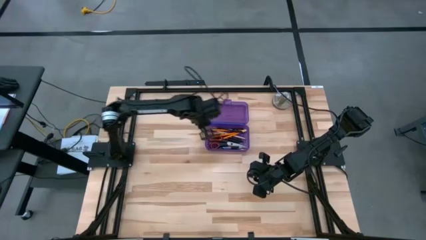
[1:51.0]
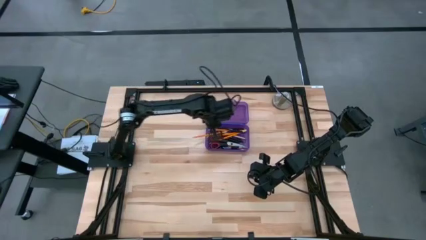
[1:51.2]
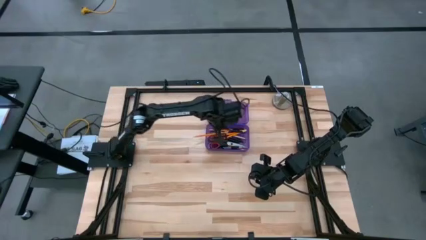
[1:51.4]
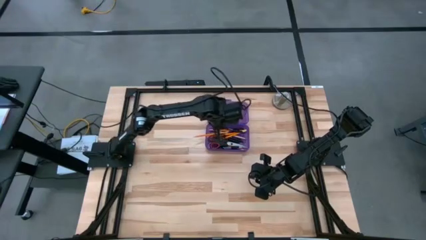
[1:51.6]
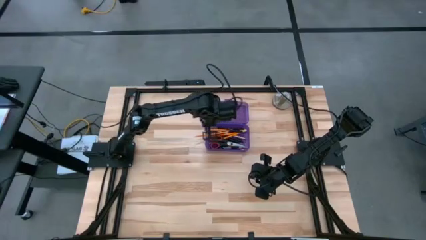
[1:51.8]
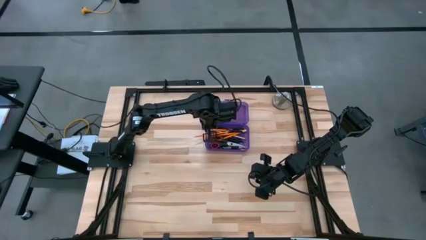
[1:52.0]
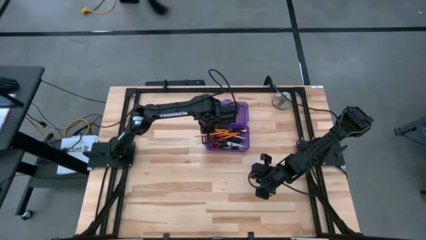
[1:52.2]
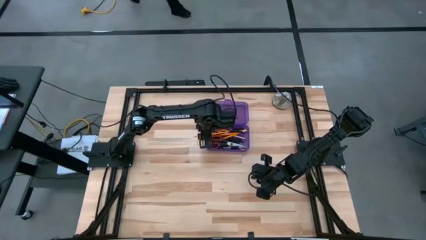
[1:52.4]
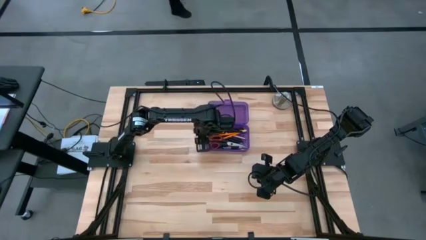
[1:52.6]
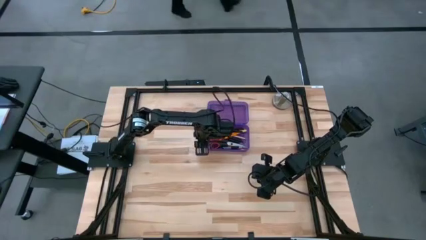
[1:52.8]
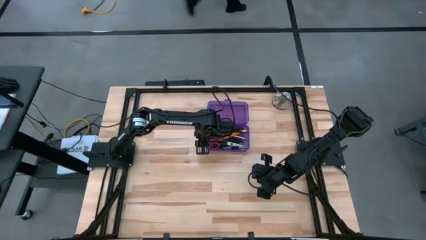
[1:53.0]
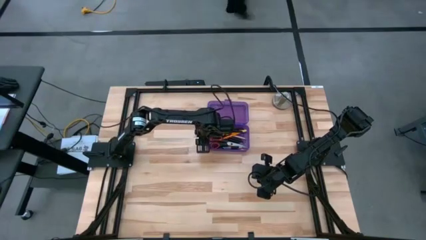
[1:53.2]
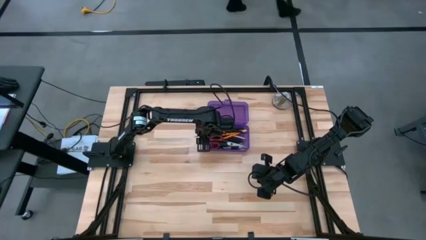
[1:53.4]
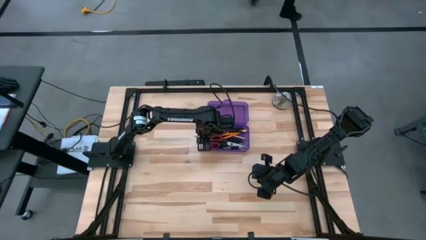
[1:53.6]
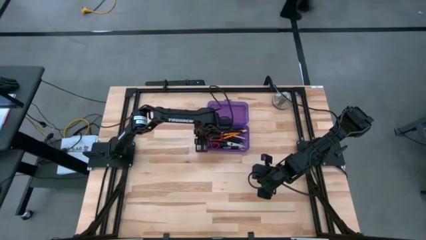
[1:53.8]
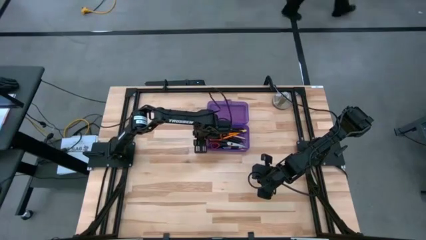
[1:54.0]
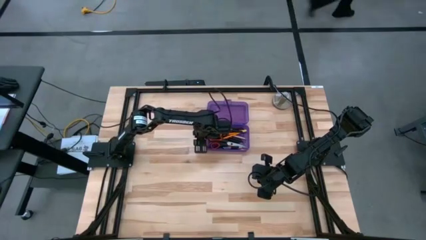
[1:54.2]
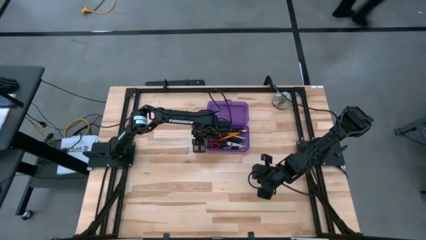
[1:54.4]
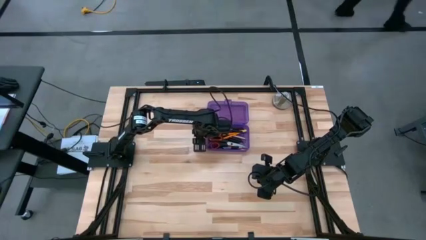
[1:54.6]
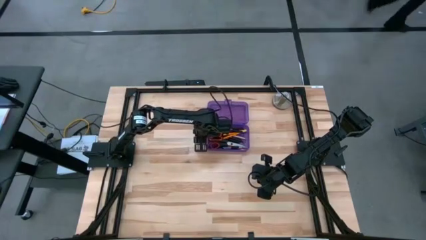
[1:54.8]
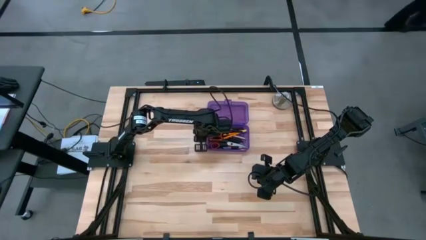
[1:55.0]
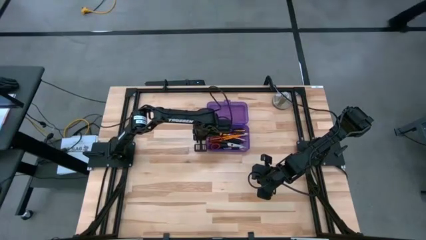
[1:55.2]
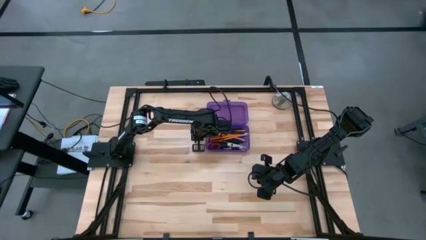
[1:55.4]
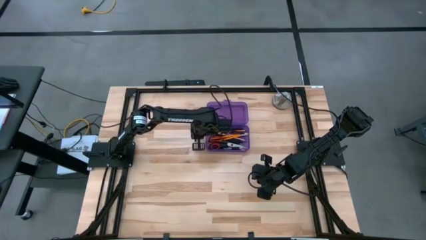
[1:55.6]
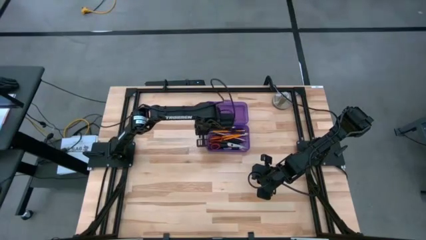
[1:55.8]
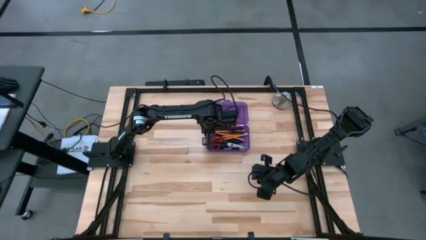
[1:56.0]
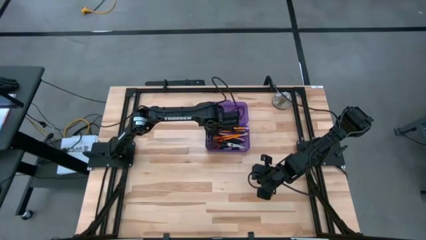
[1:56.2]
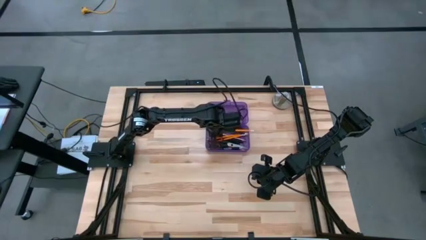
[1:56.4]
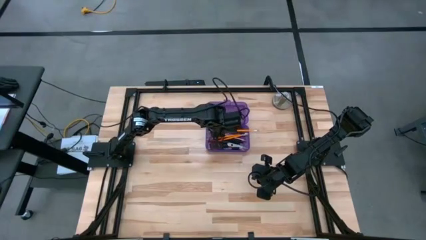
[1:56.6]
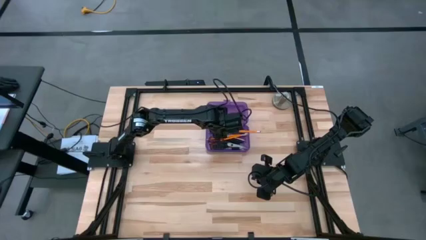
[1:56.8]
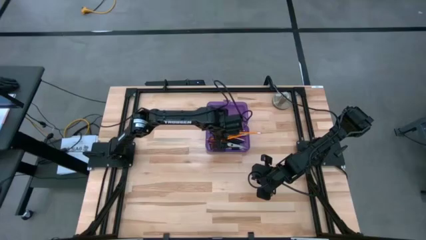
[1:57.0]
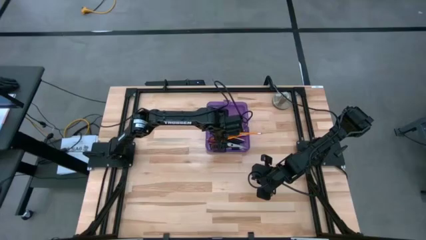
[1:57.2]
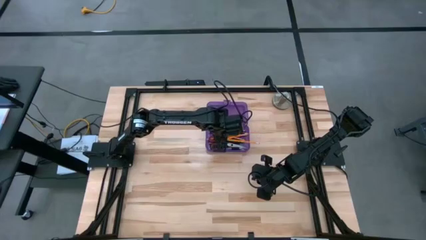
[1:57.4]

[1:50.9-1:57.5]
Task: Pick & place school supplies into a supply box
Put the orange pencil into the pencil box

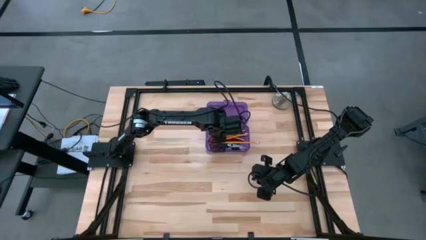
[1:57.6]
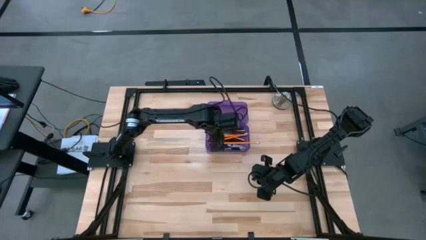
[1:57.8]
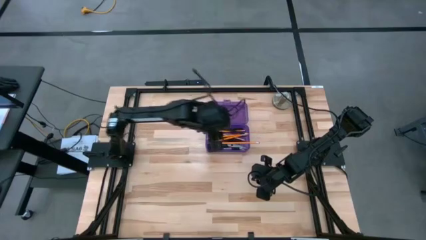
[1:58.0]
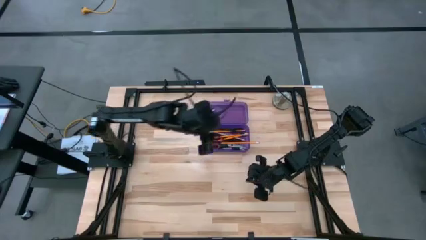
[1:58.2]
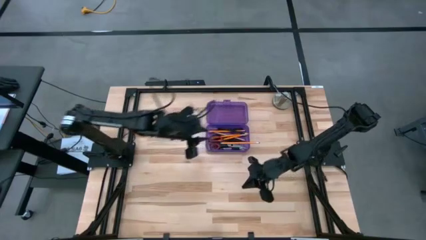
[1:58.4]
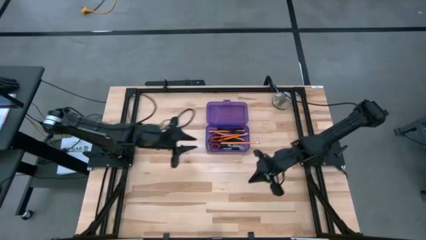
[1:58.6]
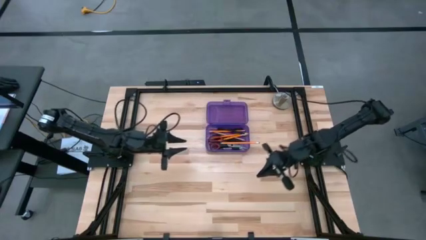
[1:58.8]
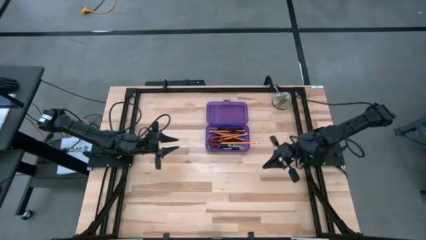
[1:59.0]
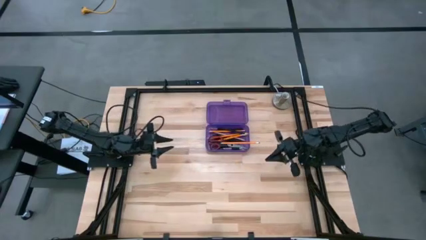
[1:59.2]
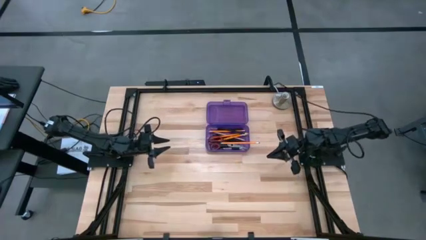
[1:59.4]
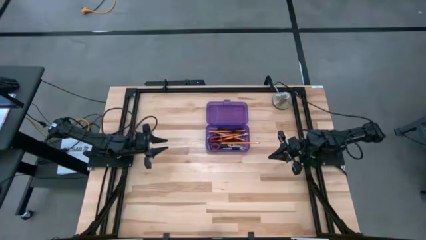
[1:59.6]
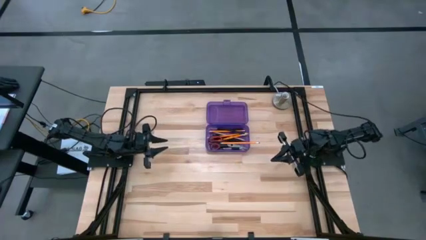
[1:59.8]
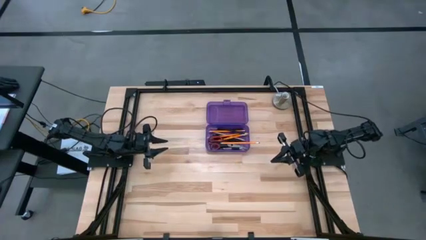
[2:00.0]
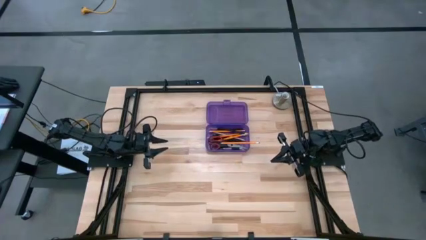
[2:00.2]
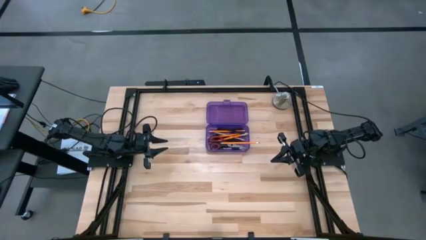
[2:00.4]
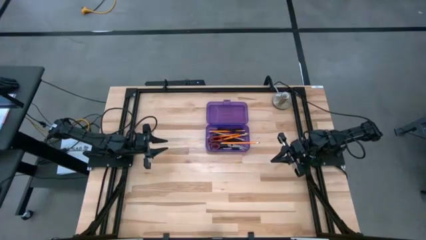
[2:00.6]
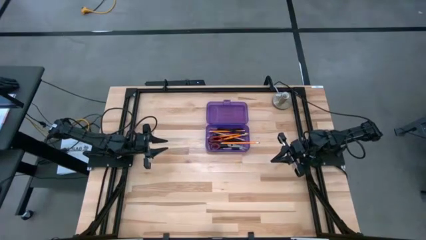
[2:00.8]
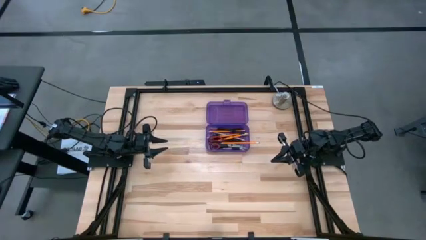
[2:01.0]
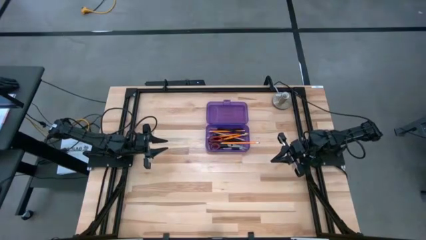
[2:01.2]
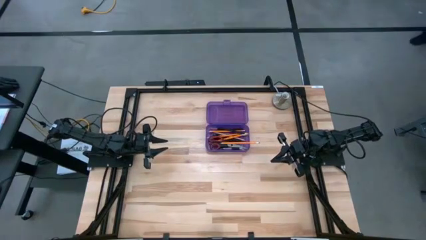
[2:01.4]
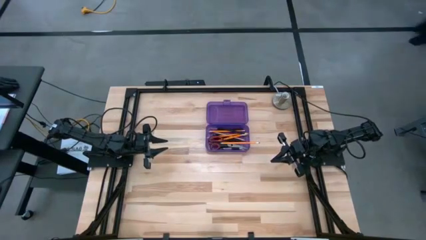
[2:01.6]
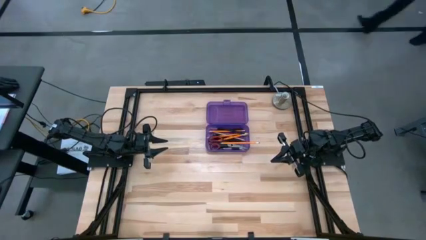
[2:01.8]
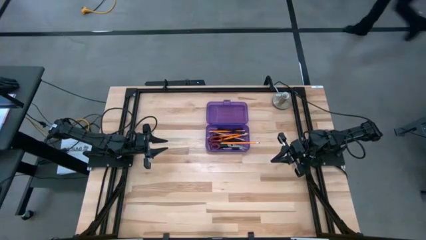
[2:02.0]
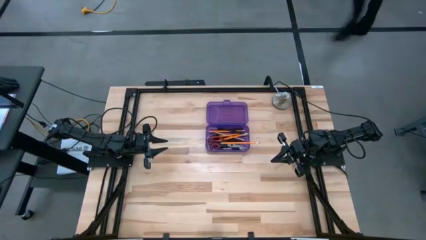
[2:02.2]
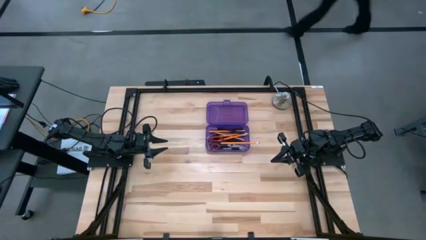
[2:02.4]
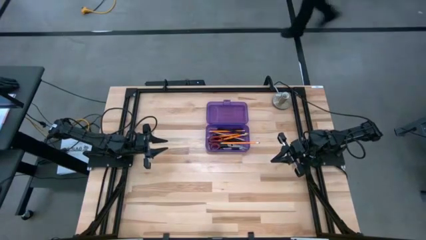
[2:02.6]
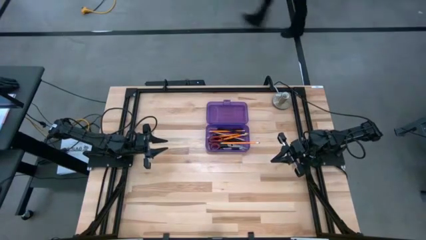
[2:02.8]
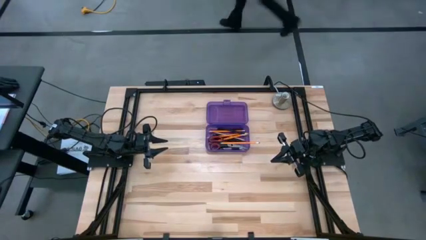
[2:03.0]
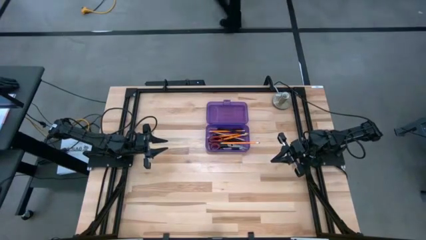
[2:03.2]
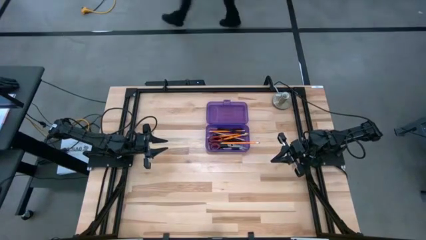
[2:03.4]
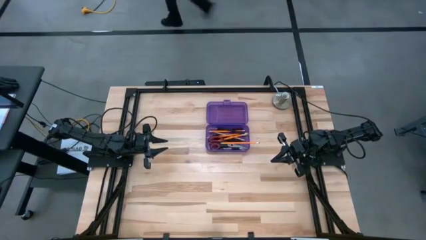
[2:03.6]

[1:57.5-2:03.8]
Return to Home Position
